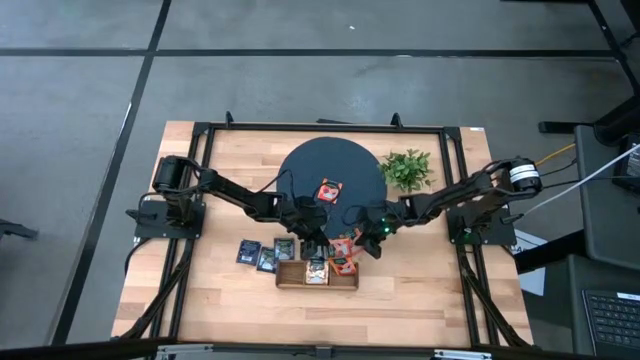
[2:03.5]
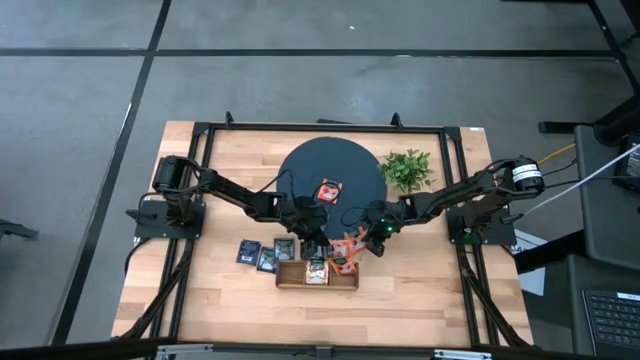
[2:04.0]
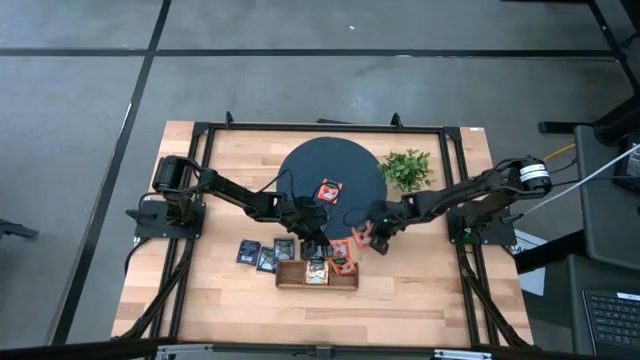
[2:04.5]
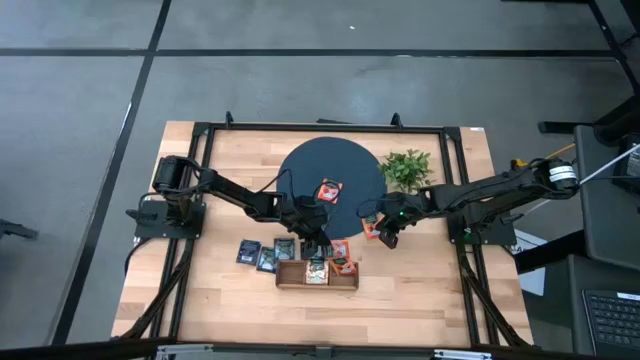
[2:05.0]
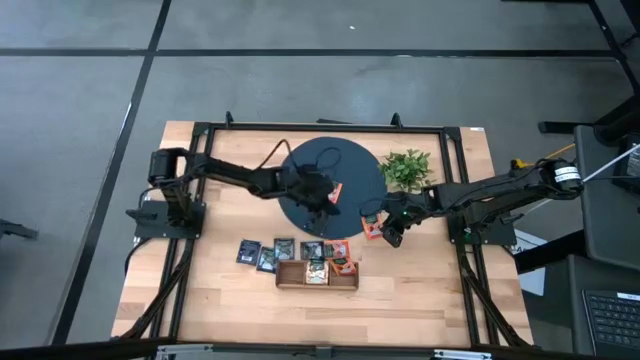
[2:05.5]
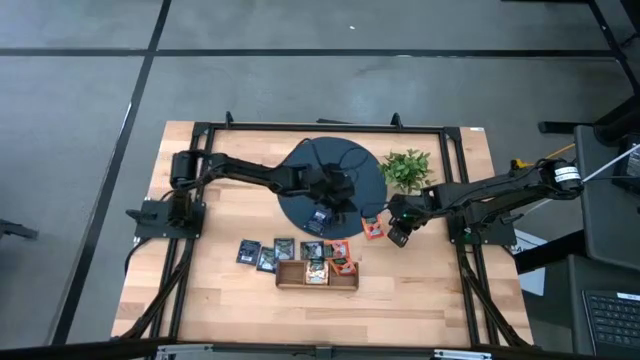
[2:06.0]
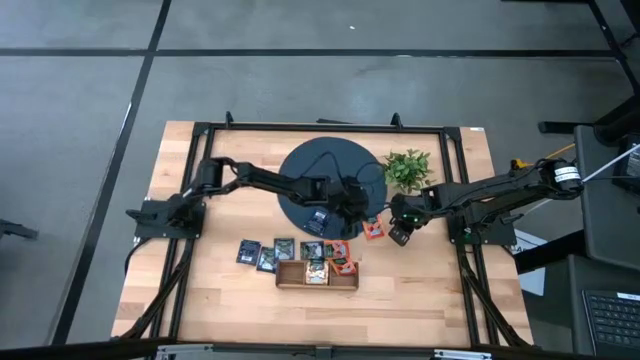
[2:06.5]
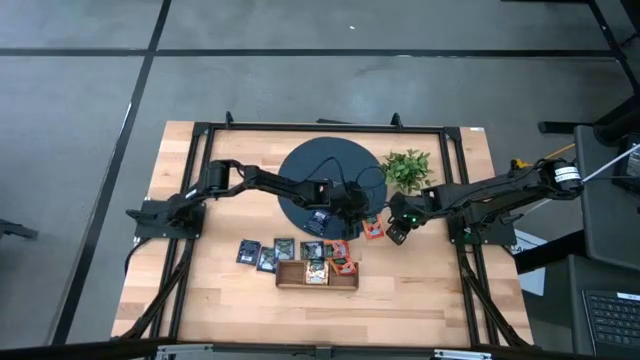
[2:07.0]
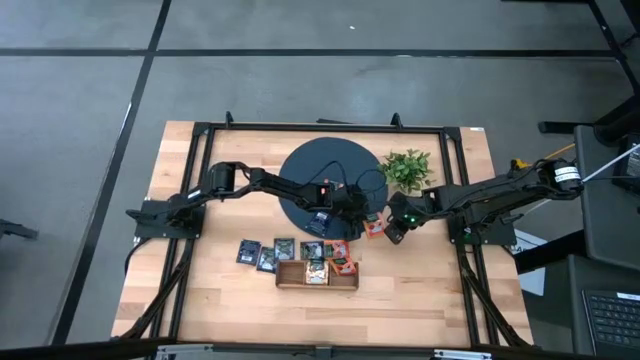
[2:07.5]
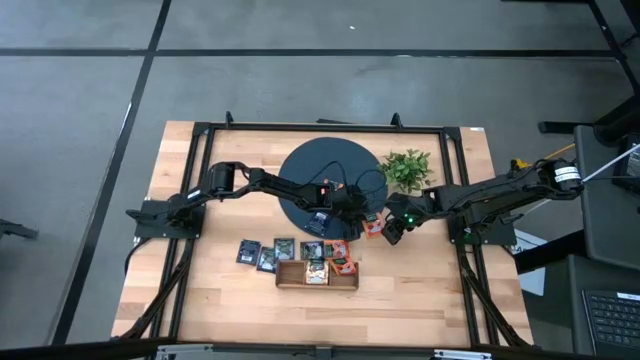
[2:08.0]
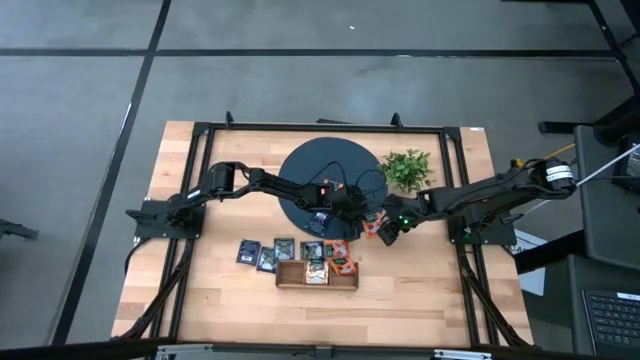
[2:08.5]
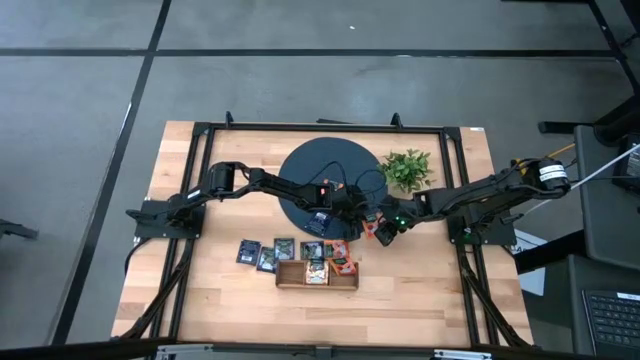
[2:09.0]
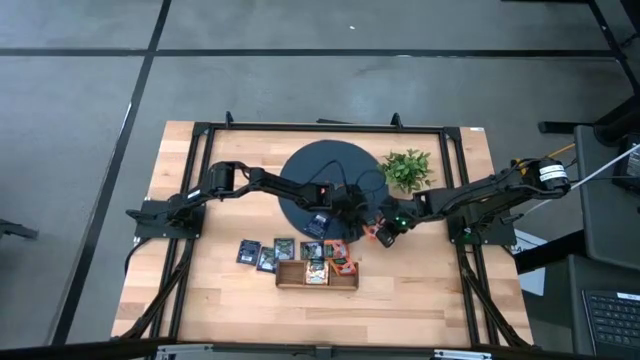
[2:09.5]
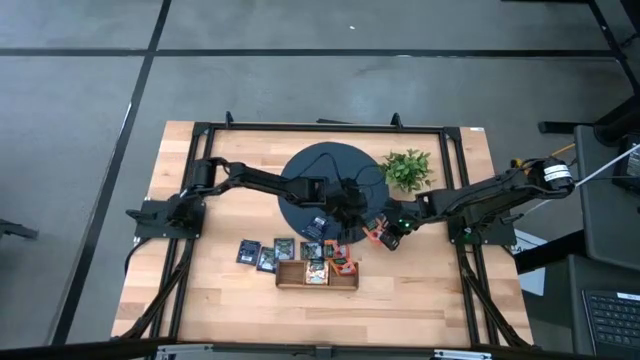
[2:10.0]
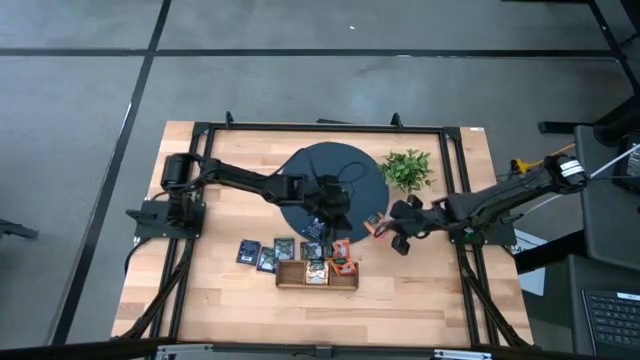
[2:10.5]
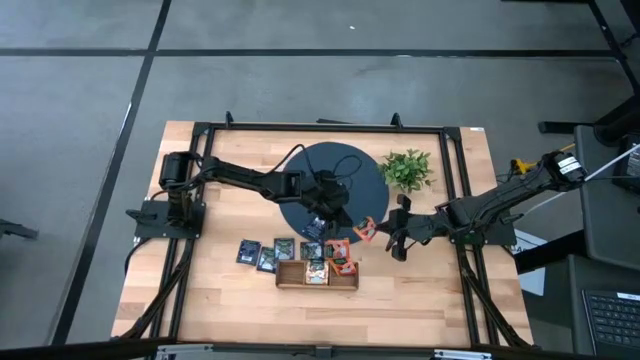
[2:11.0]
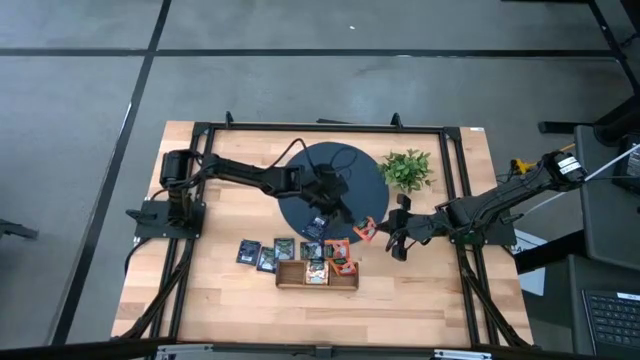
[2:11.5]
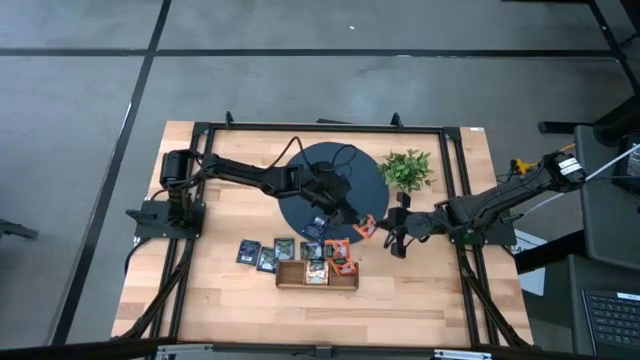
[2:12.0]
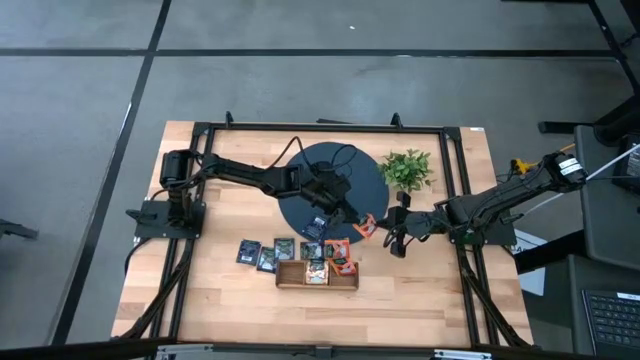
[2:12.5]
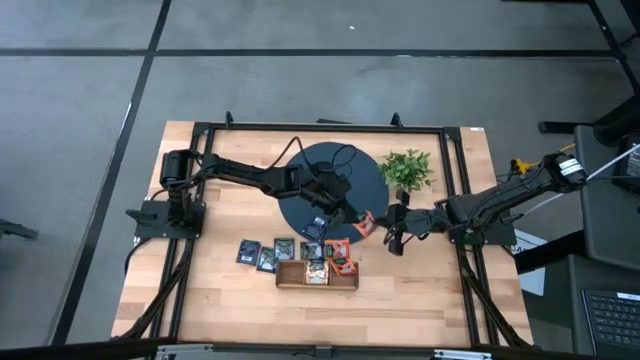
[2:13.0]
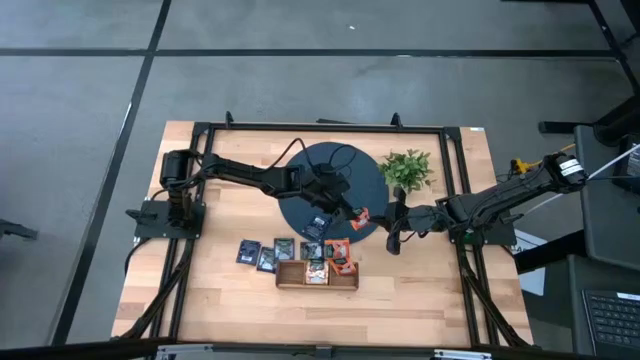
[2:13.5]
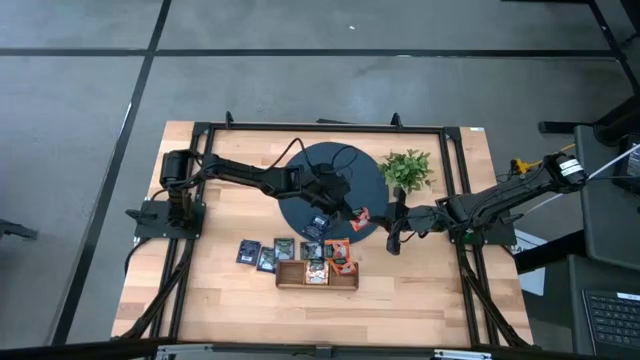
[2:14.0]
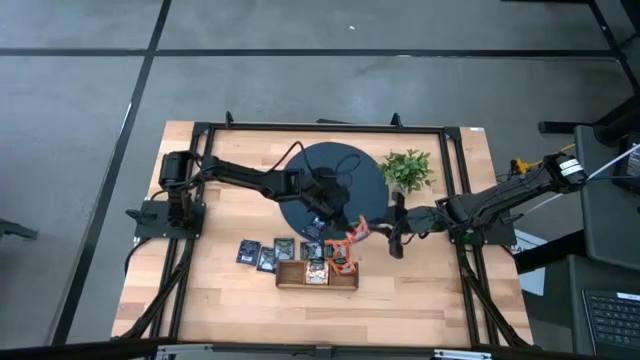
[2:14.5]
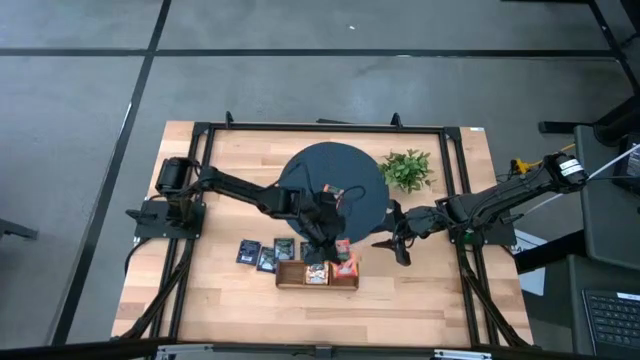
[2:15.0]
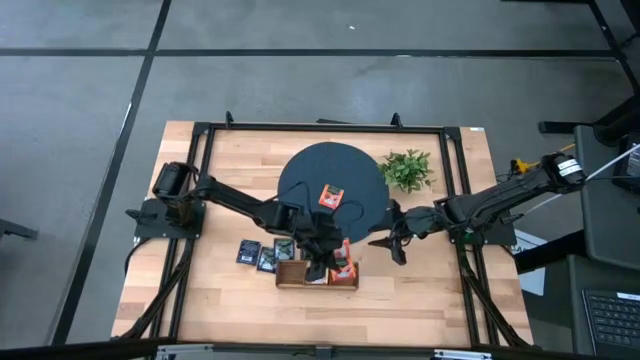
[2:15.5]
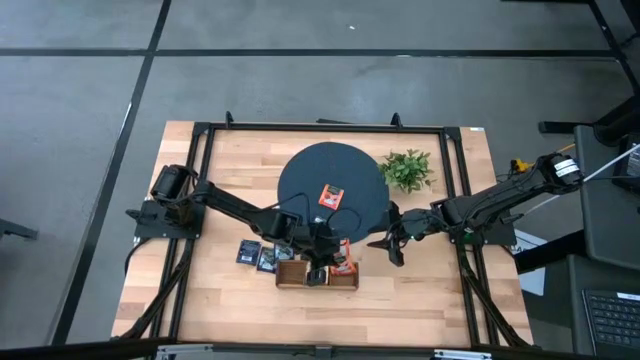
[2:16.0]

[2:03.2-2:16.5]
Task: Pick & Place Tea
Put the orange tea bag into the right section of the wooden organizer

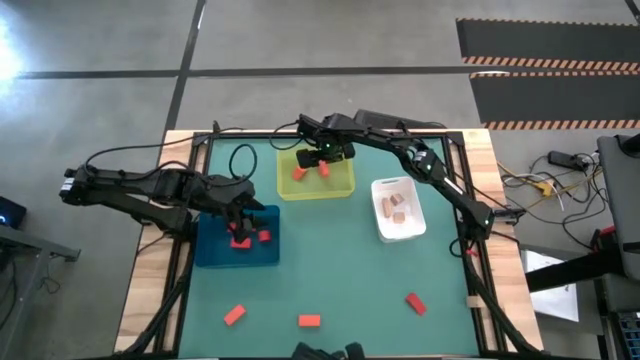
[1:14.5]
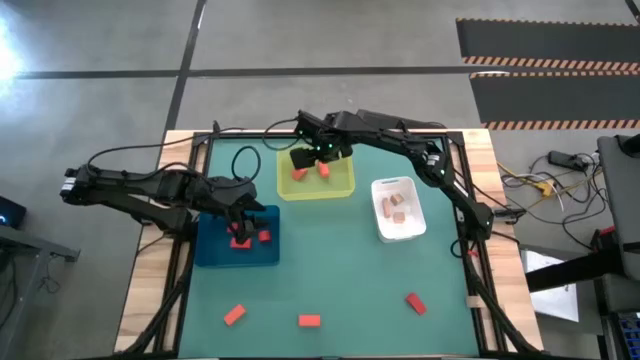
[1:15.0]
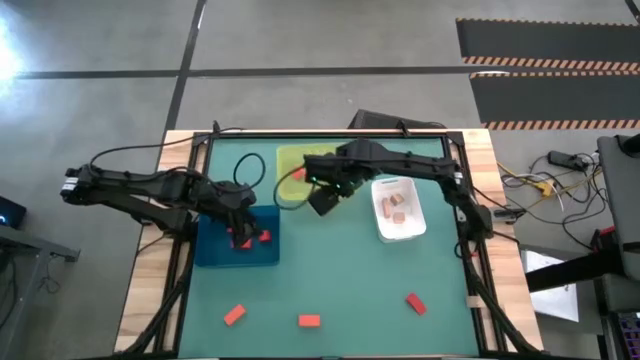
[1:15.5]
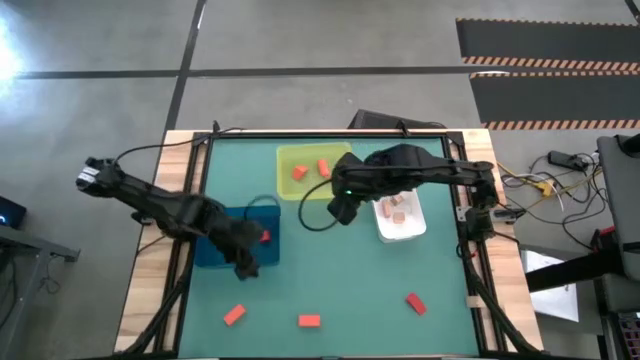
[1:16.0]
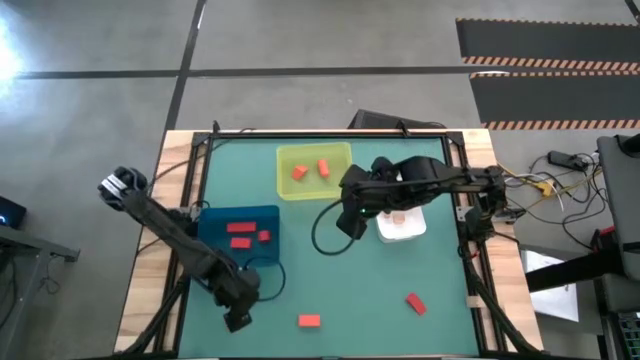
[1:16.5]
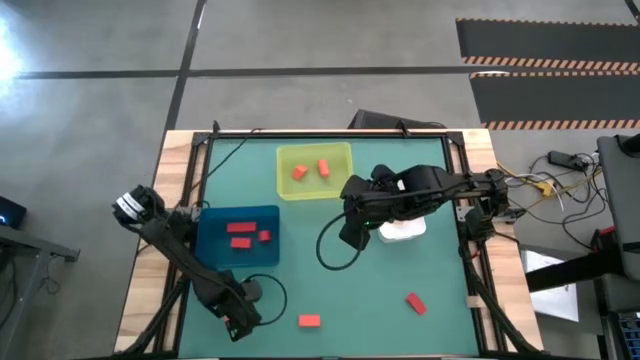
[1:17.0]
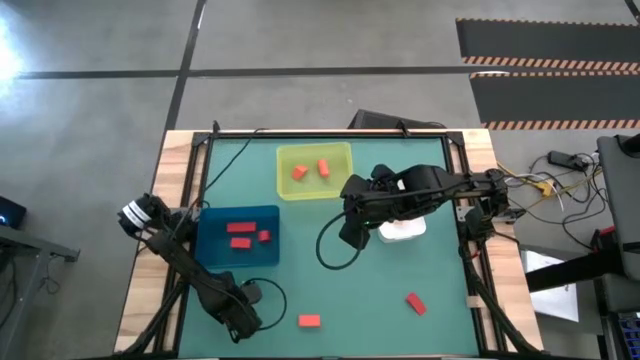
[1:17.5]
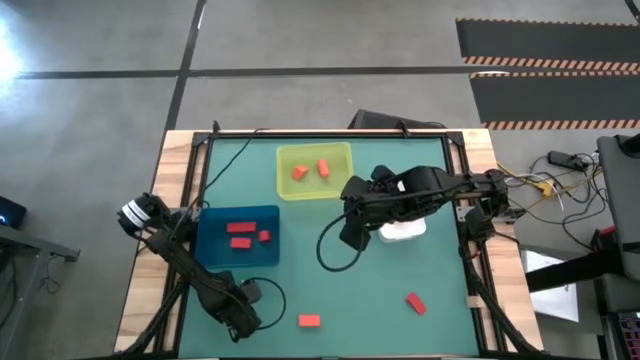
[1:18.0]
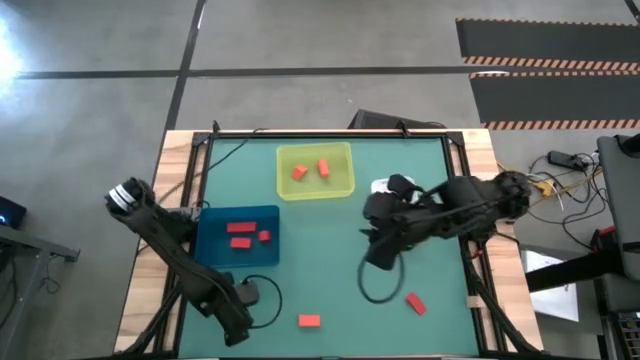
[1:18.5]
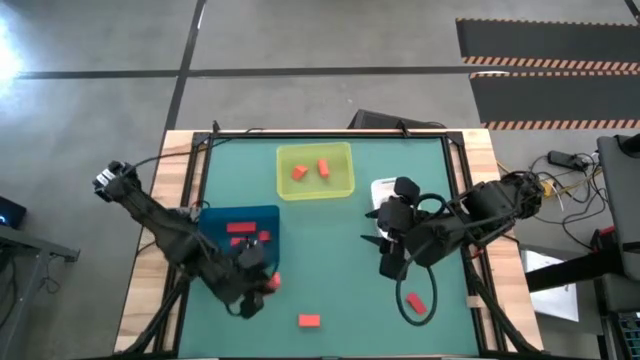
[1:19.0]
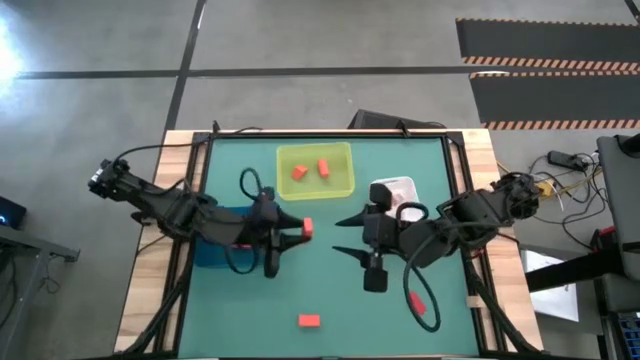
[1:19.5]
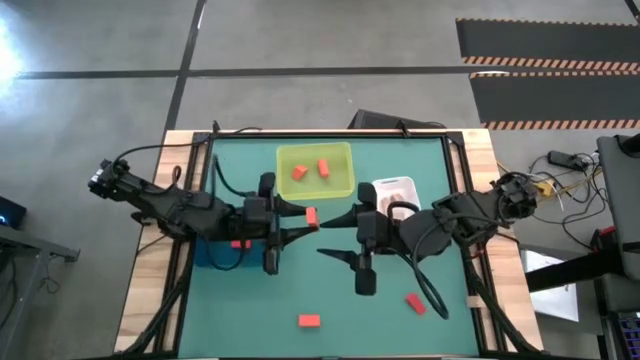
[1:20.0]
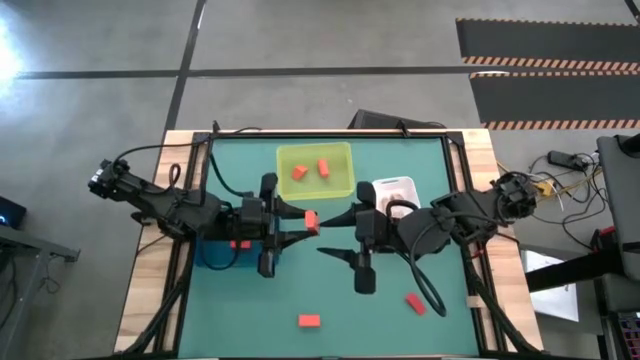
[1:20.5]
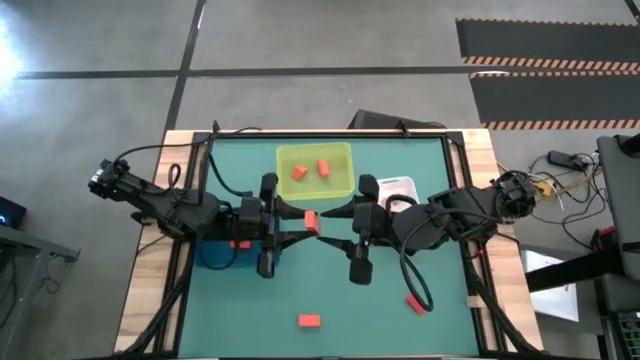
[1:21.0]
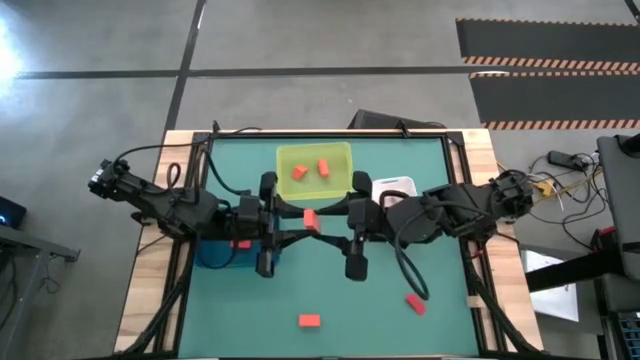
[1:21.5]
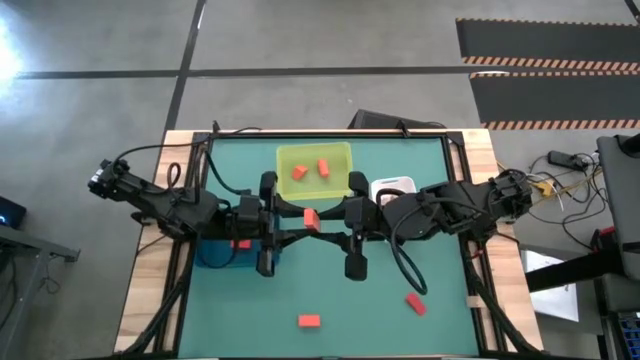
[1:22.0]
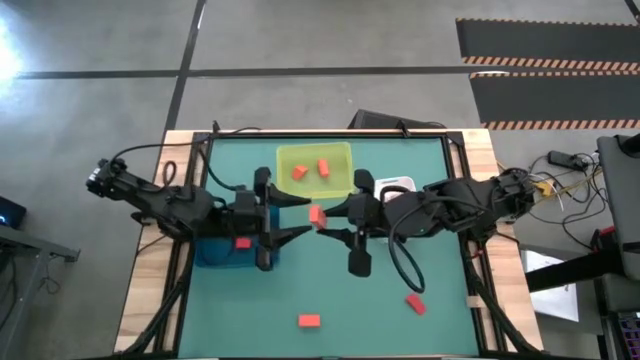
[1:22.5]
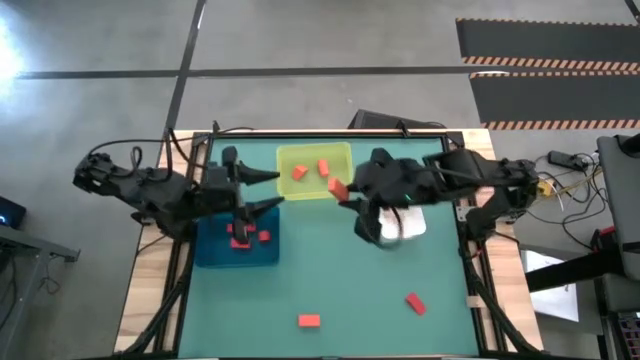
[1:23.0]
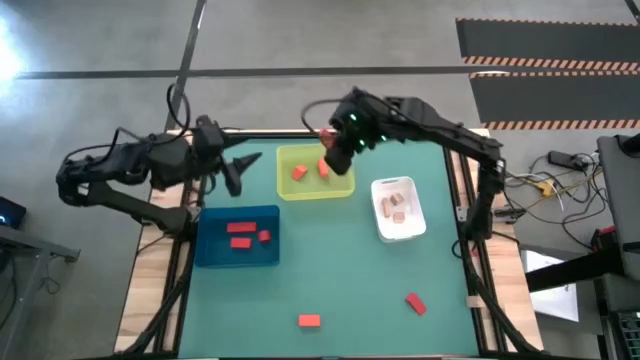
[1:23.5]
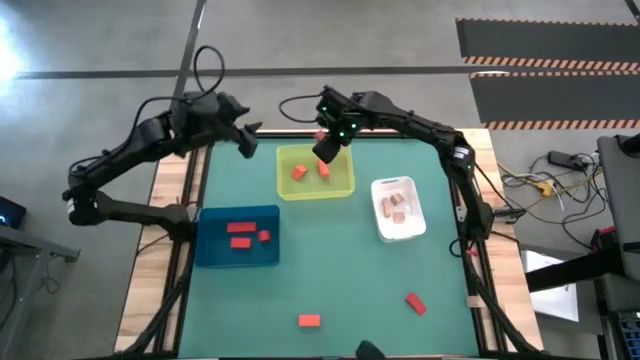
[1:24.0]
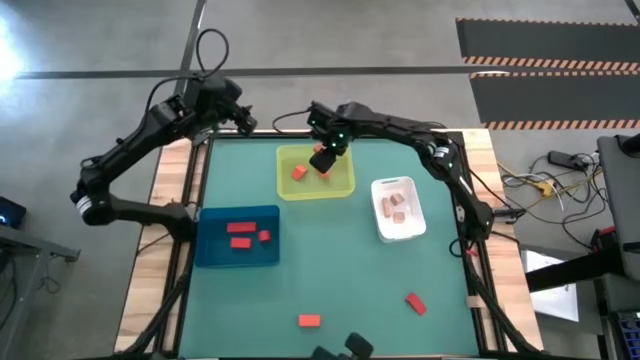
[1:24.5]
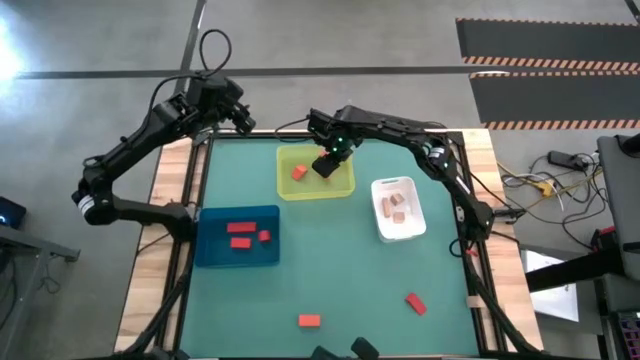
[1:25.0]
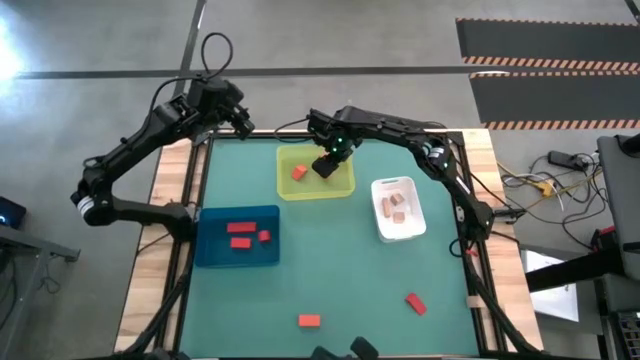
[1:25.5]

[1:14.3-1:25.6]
Task: Sort & place blocks by color
Put the orange block into the yellow bin
